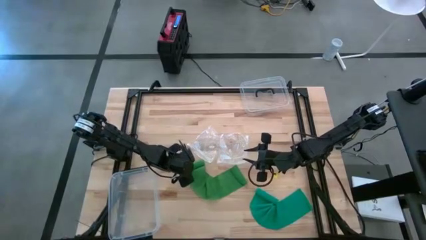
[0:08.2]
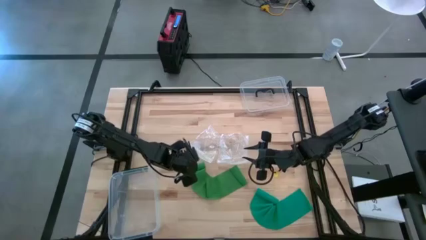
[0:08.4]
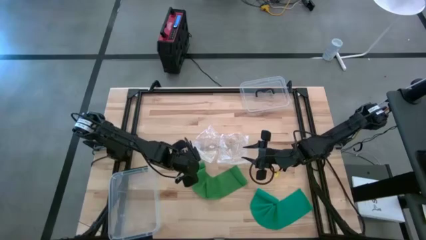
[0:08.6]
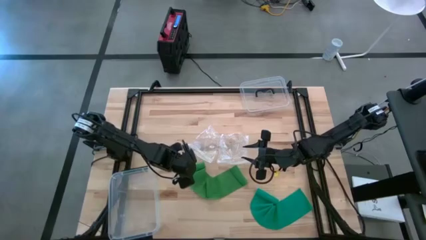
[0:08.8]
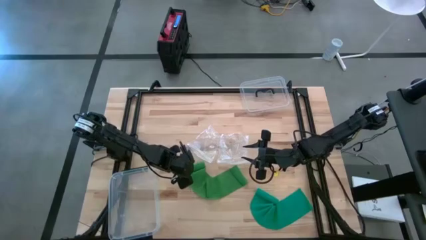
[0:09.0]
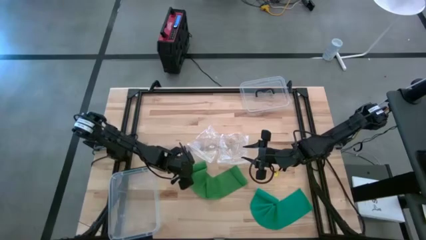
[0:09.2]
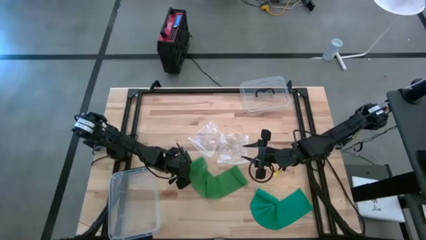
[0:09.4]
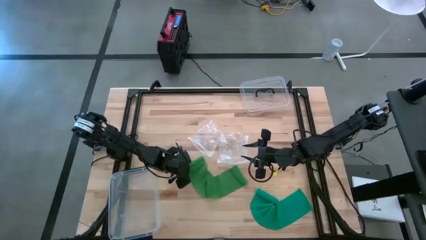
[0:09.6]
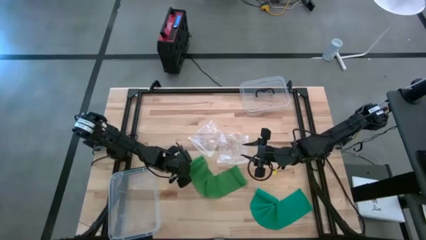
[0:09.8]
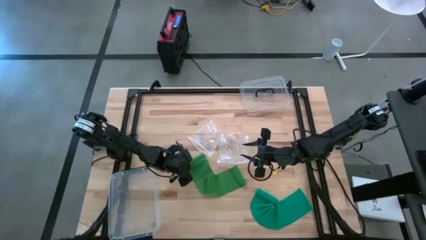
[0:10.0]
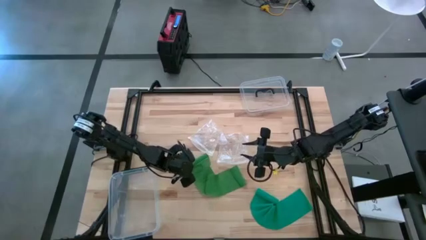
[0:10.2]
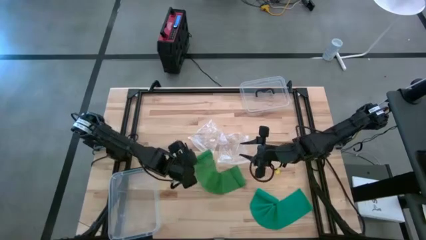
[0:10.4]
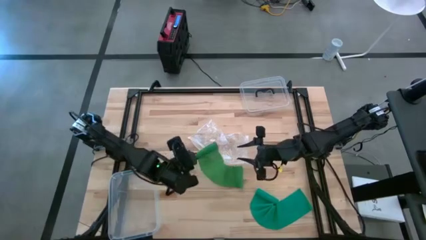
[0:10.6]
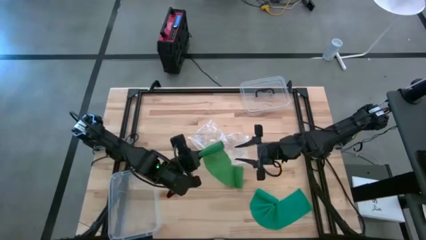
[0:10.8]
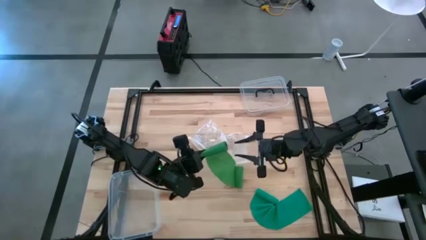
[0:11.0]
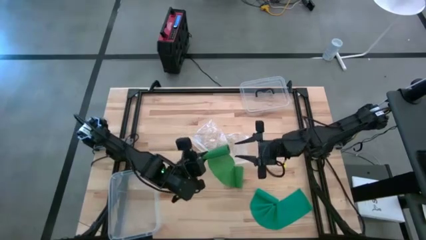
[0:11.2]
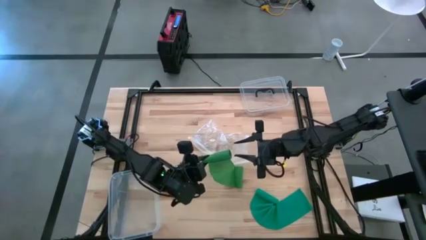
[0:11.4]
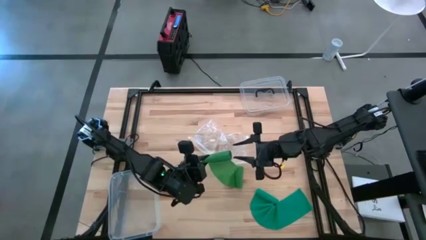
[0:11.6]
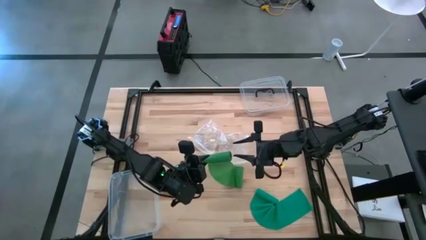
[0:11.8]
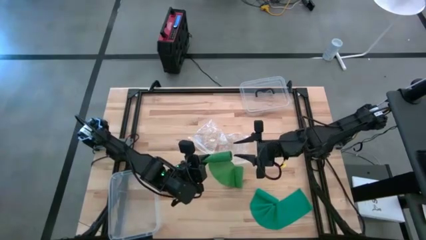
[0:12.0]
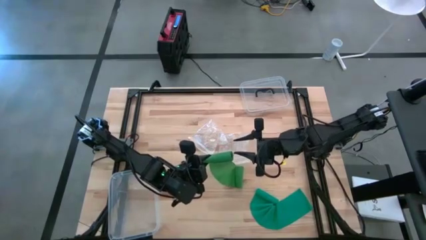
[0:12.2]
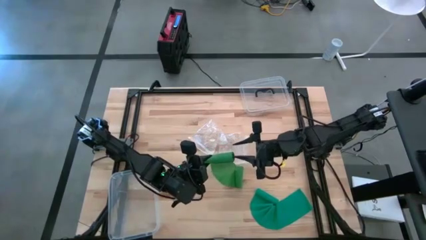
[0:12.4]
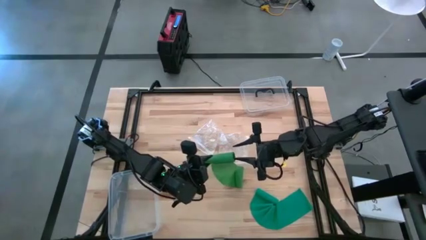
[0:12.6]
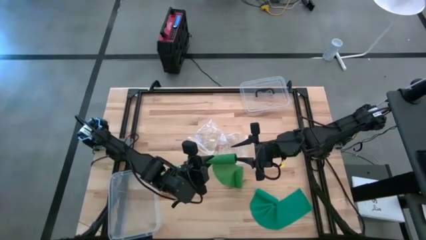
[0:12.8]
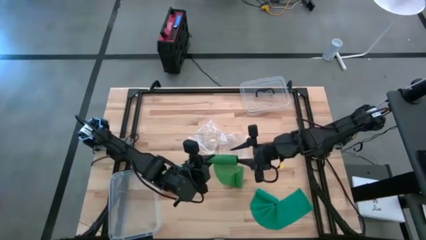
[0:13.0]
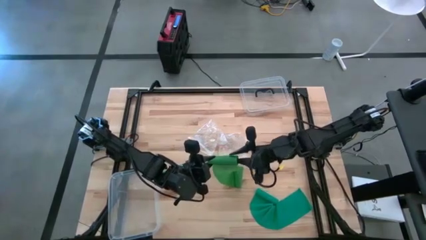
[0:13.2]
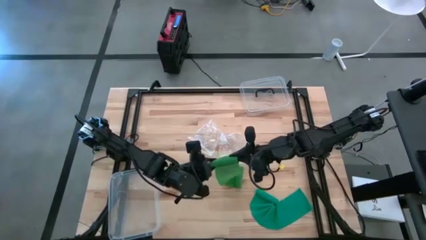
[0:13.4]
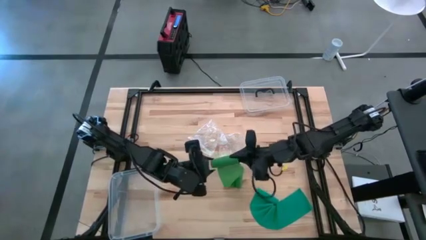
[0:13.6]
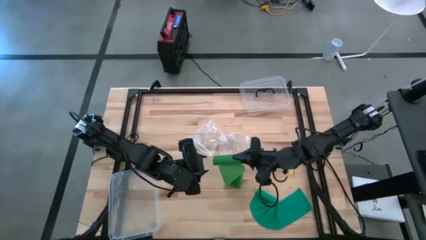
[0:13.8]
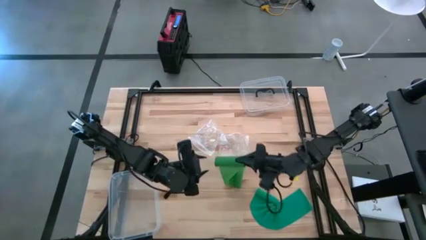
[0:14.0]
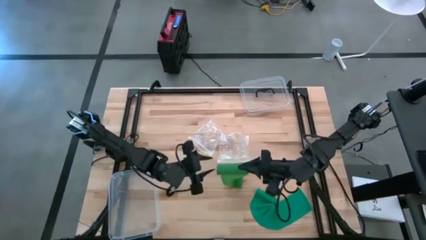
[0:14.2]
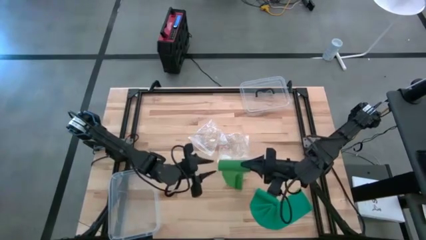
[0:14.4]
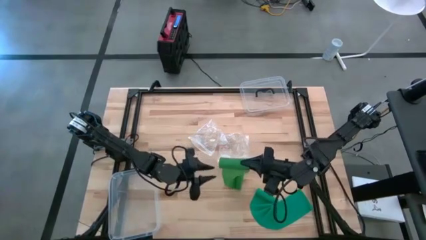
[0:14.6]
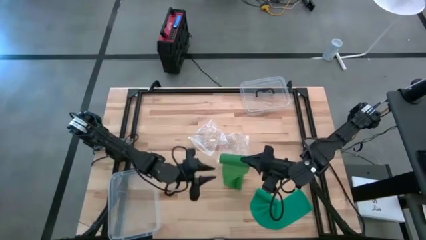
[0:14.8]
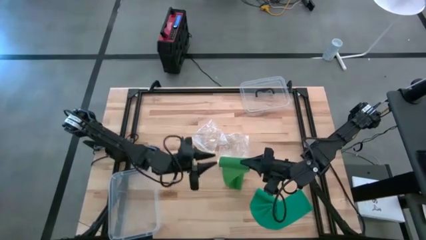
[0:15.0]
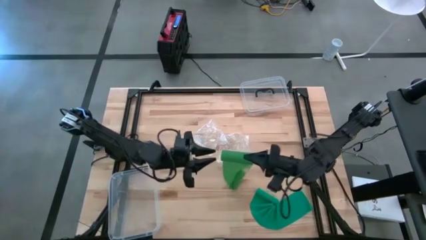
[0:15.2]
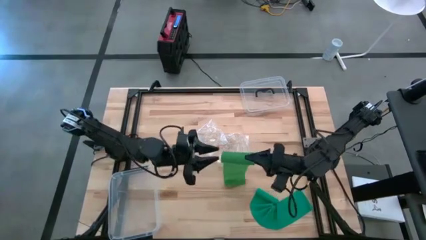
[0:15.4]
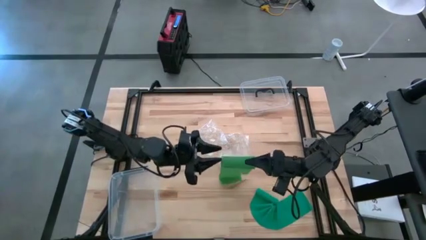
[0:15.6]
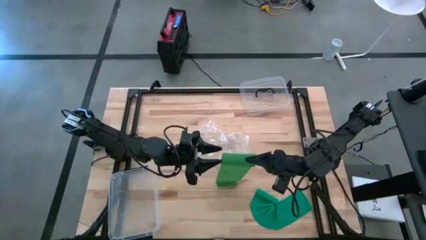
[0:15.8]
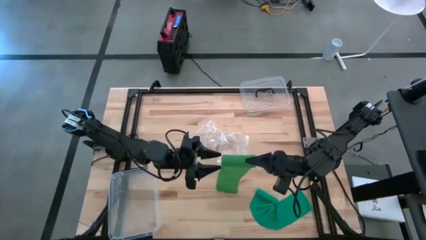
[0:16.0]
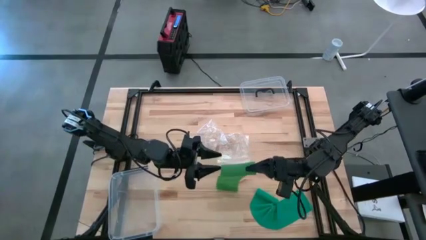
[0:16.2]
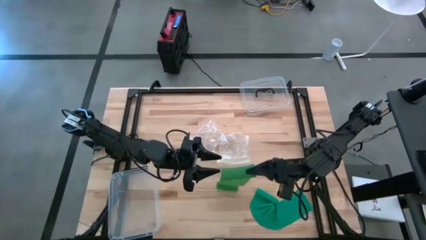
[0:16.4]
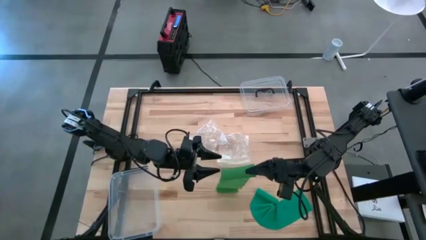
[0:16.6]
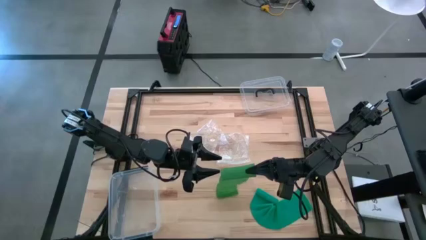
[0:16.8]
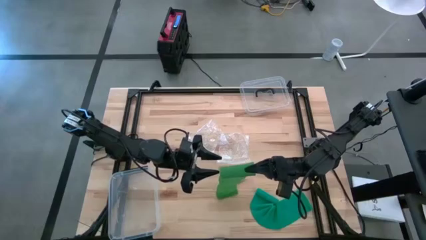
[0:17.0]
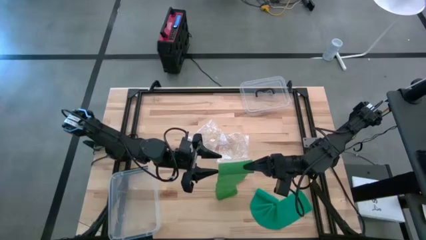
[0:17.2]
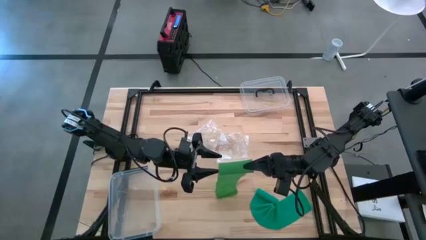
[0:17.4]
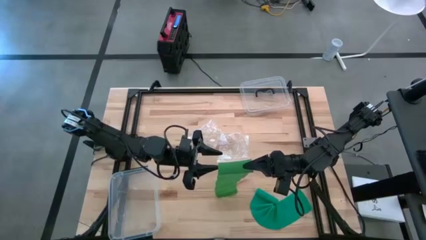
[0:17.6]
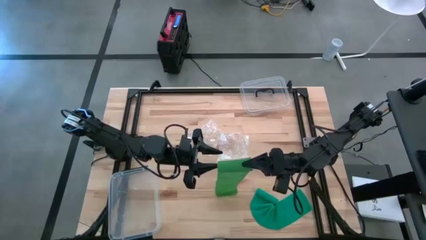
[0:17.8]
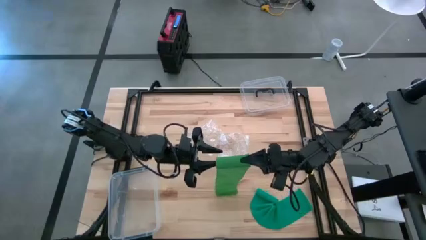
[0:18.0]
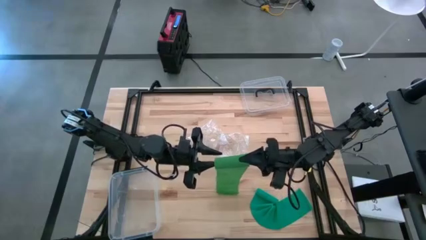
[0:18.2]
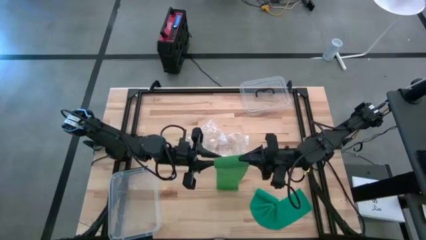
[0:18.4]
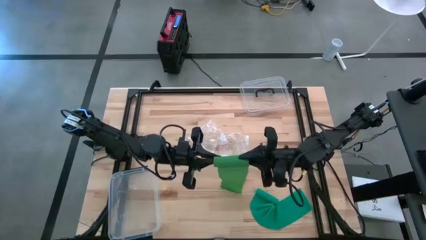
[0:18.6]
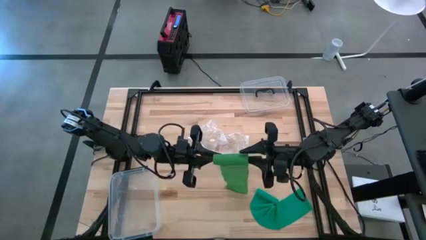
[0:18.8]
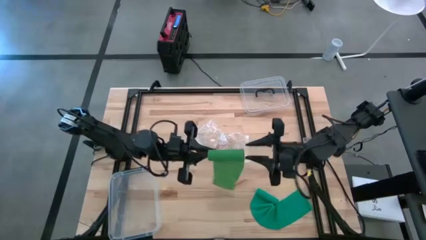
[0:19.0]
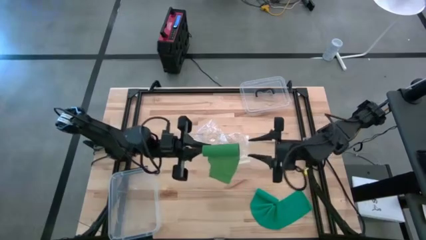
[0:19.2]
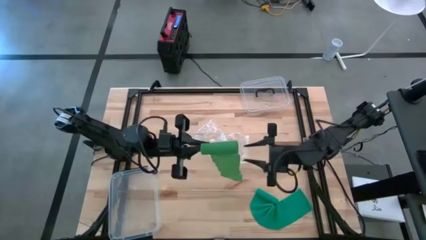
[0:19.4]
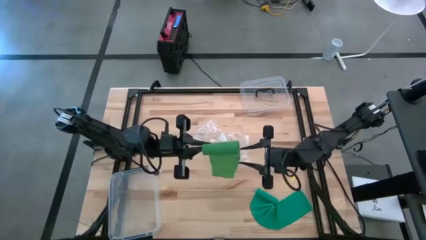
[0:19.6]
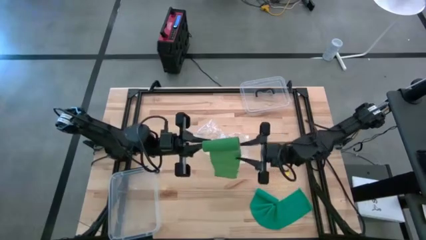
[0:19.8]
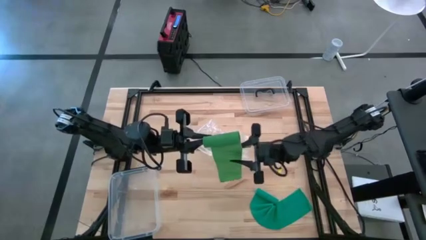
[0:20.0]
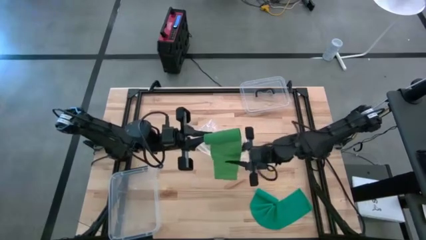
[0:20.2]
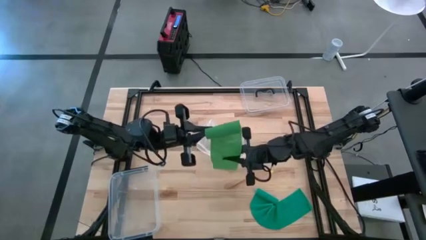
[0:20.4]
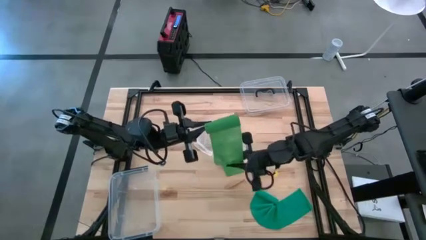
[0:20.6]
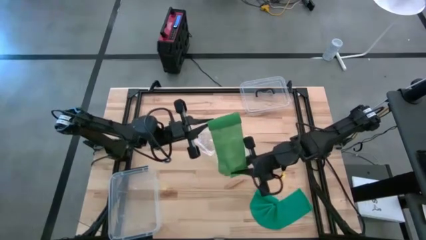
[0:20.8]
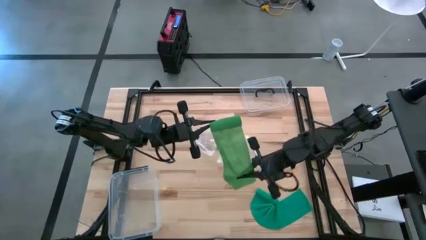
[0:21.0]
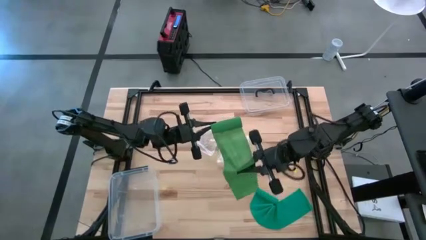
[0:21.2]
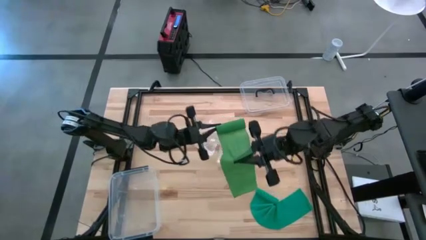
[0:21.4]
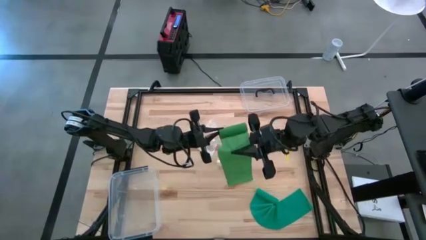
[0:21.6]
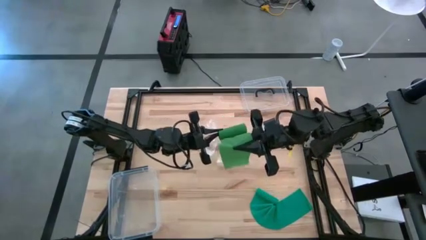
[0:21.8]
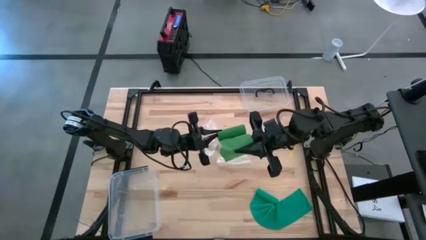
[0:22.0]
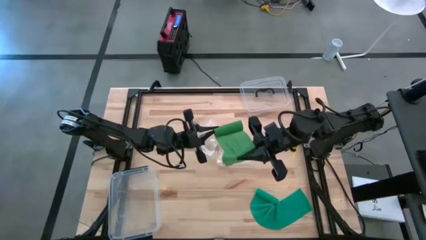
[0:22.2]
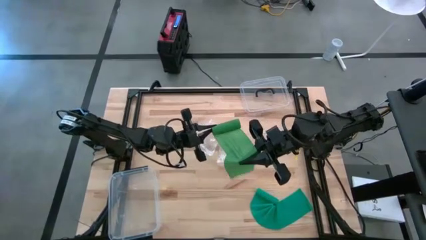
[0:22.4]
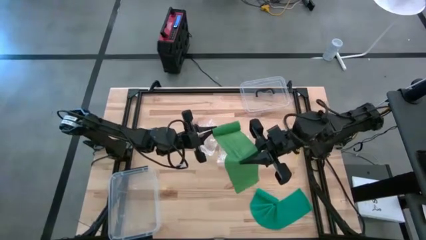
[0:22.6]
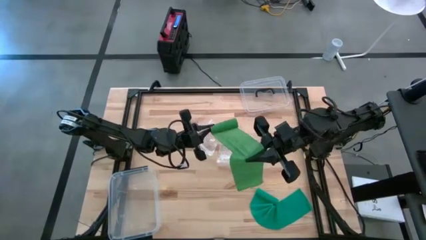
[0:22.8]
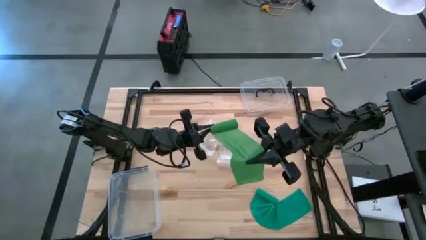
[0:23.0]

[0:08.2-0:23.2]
Task: Roll bandage
Roll the green bandage

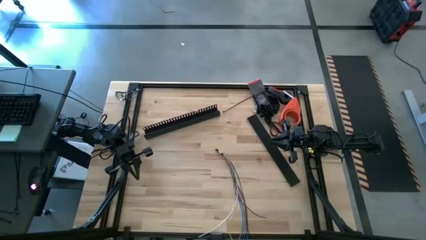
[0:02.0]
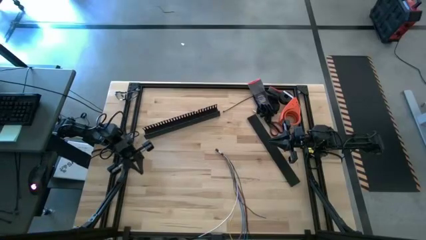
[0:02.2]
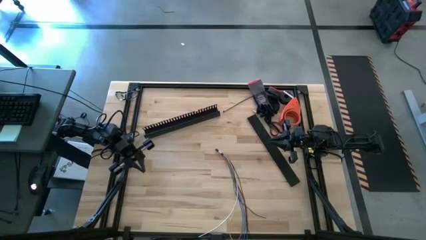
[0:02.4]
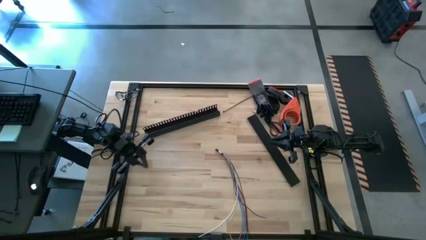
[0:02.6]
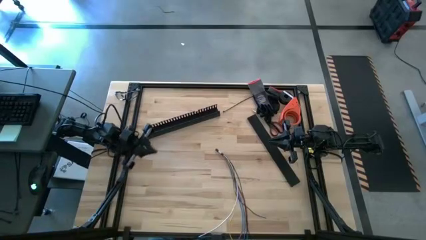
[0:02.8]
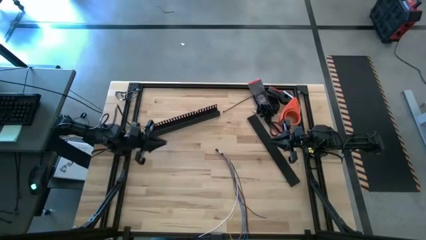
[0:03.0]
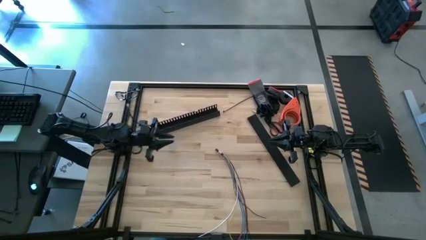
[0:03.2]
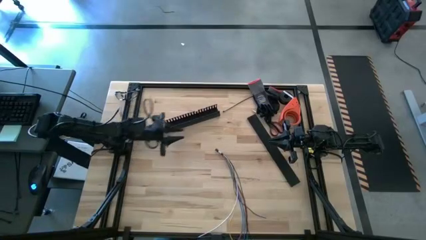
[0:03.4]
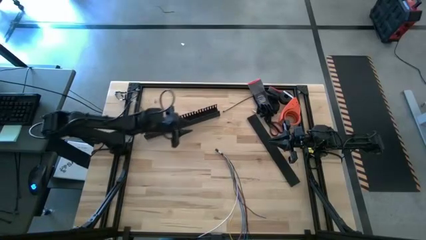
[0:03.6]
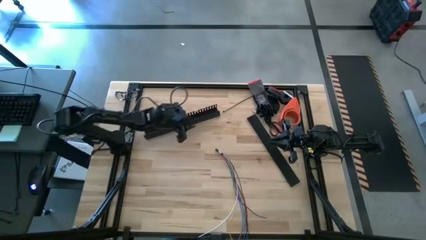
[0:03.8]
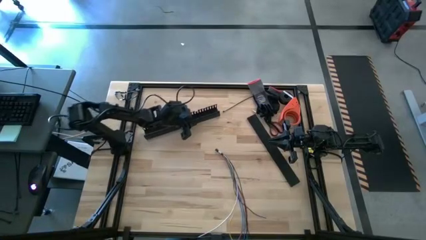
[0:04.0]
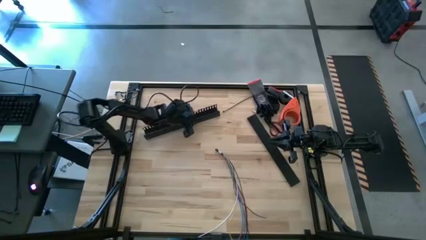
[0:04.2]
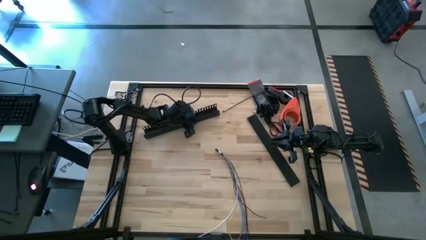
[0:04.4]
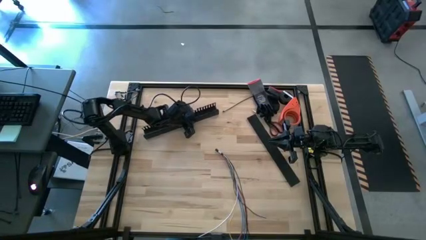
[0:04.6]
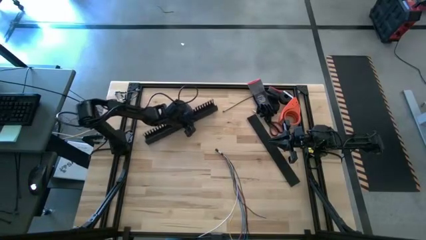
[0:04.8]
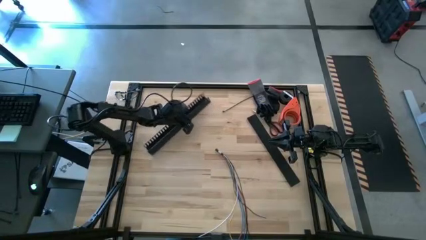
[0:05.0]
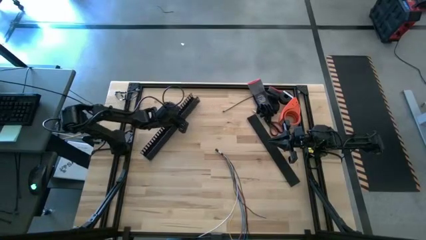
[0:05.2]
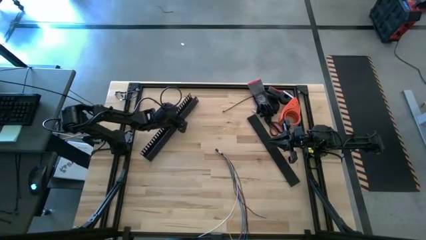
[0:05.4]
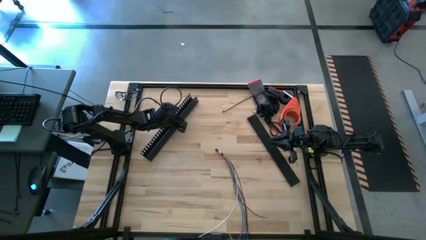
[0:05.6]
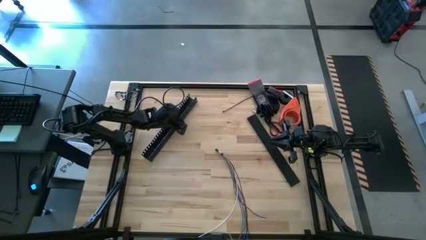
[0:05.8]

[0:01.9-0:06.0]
Task: Ziptie cables
Adjust the cable duct on the table
